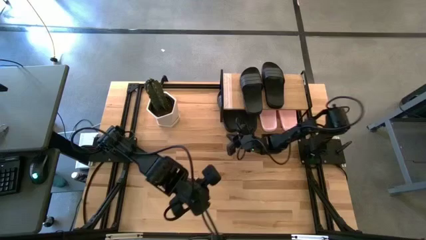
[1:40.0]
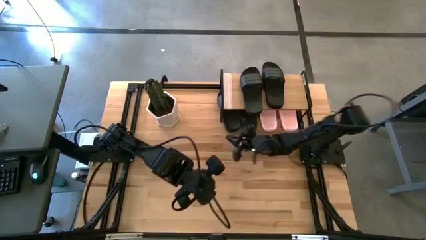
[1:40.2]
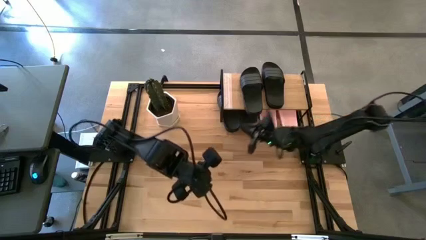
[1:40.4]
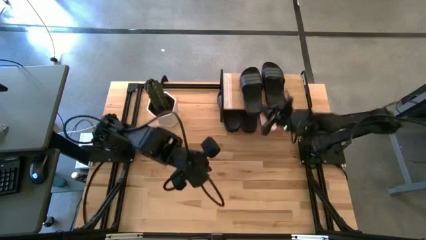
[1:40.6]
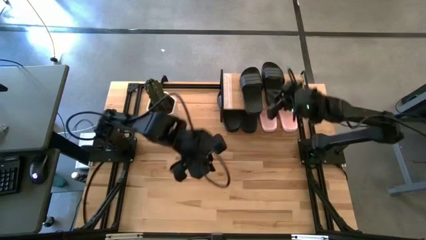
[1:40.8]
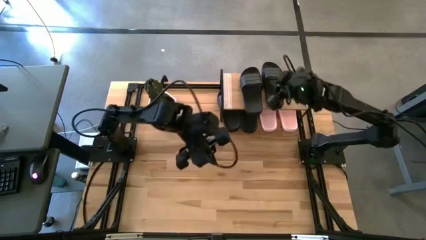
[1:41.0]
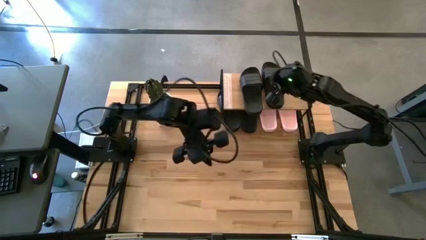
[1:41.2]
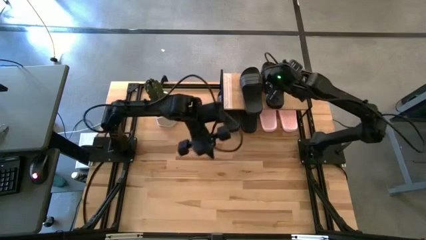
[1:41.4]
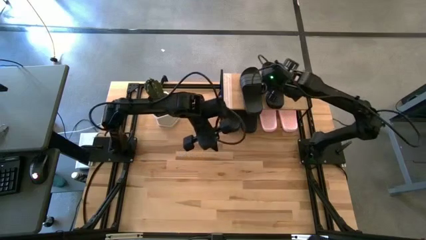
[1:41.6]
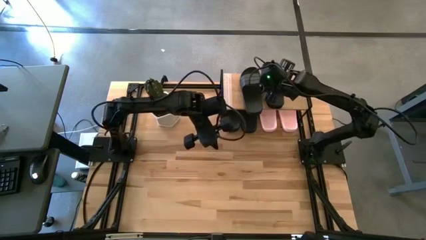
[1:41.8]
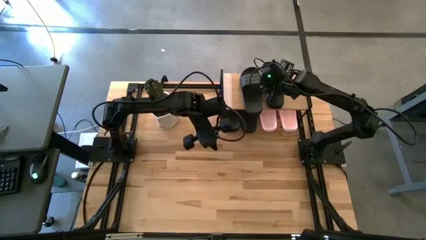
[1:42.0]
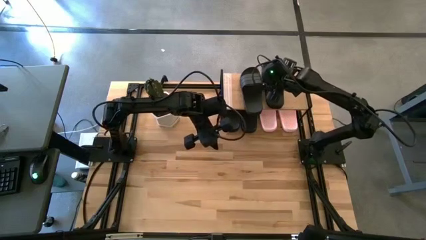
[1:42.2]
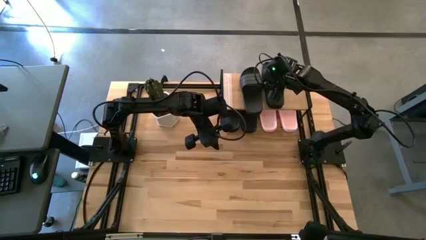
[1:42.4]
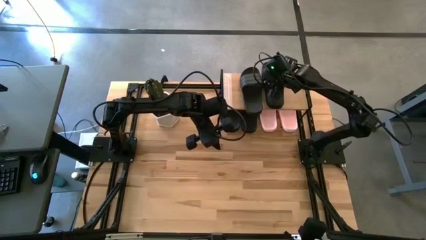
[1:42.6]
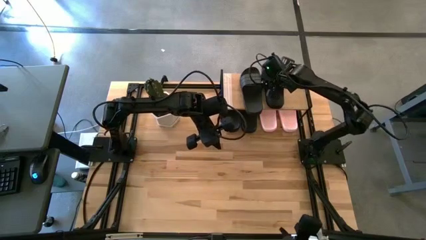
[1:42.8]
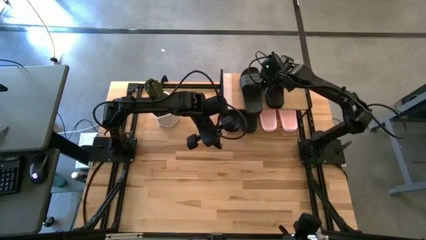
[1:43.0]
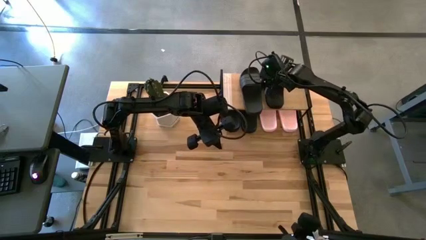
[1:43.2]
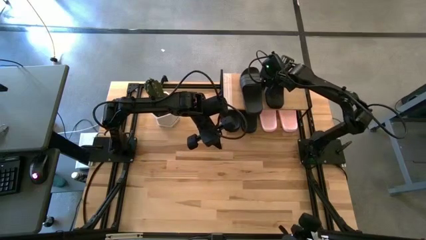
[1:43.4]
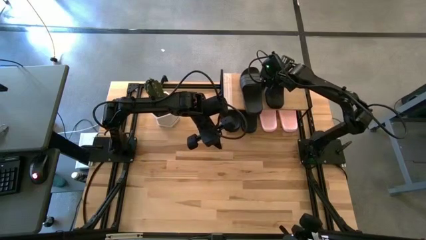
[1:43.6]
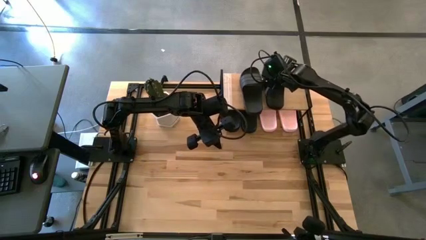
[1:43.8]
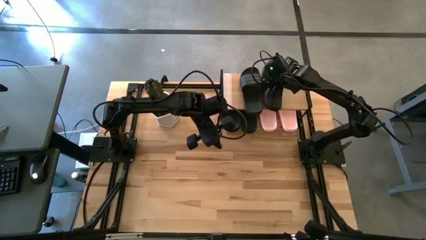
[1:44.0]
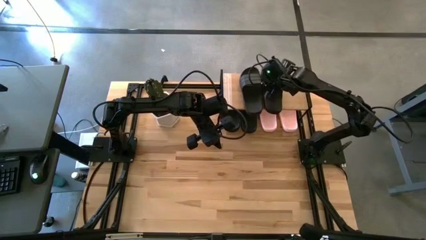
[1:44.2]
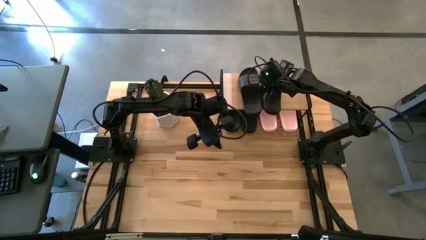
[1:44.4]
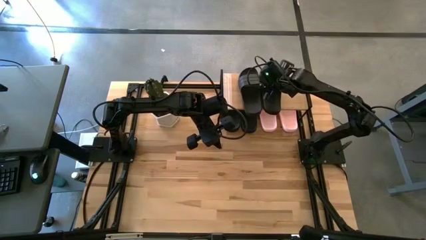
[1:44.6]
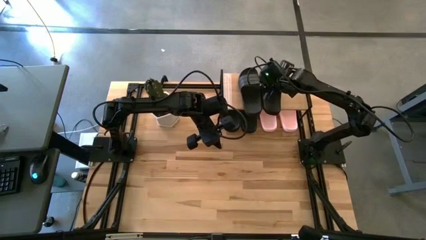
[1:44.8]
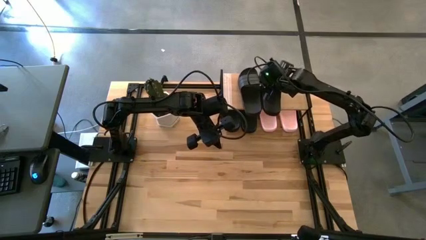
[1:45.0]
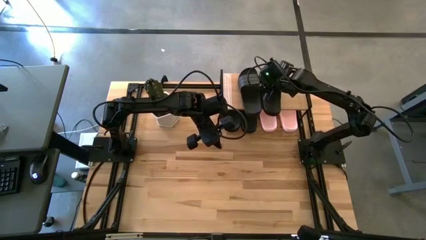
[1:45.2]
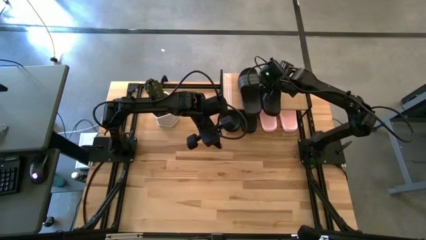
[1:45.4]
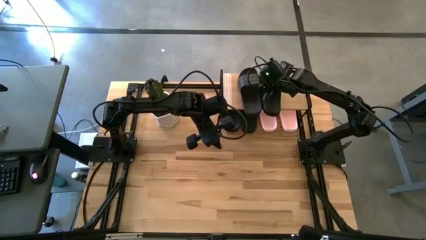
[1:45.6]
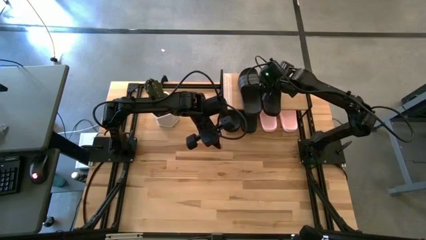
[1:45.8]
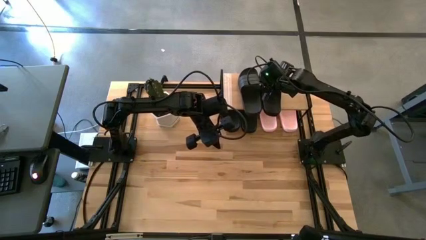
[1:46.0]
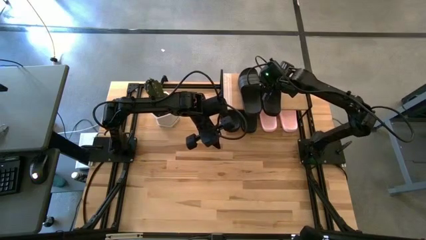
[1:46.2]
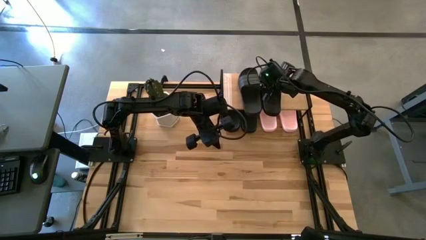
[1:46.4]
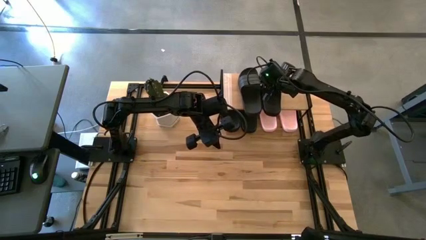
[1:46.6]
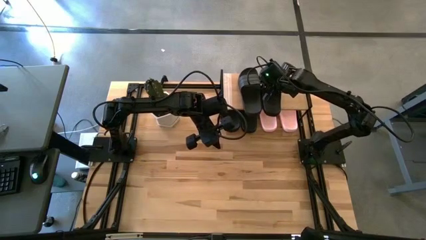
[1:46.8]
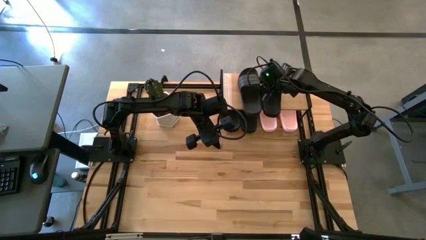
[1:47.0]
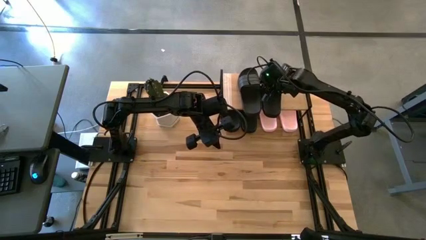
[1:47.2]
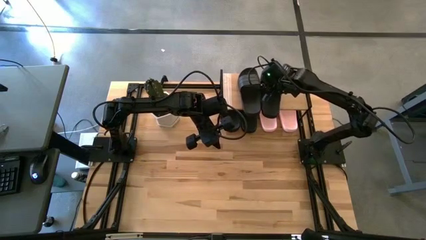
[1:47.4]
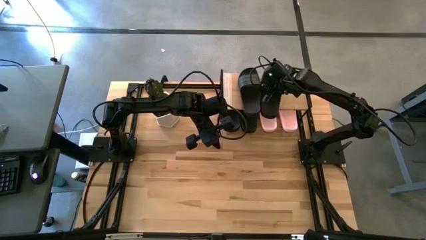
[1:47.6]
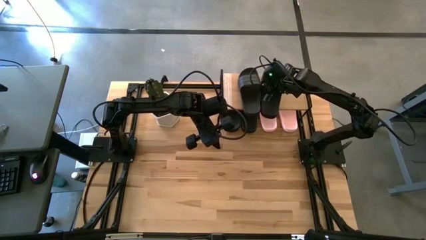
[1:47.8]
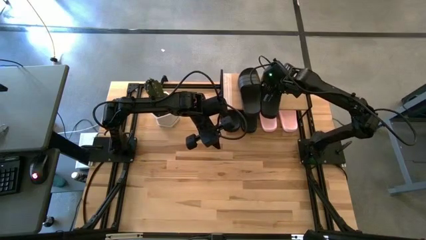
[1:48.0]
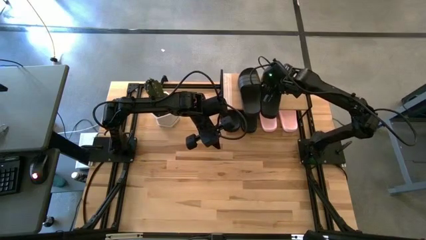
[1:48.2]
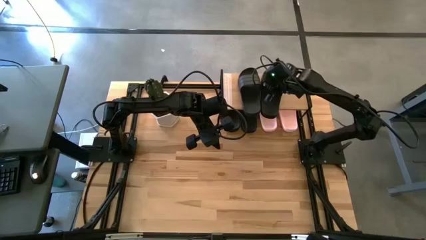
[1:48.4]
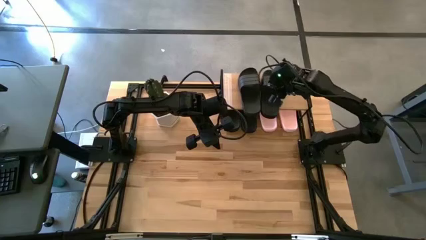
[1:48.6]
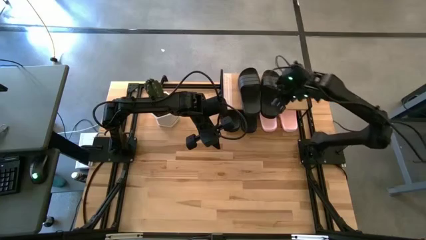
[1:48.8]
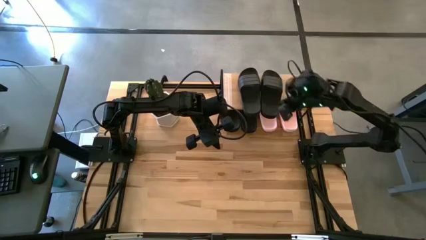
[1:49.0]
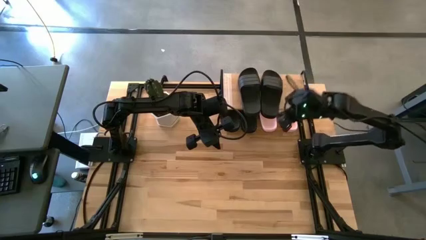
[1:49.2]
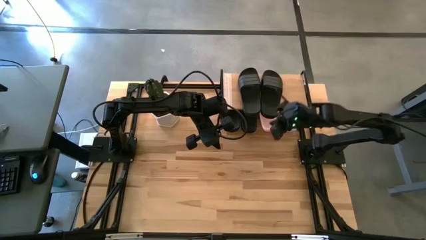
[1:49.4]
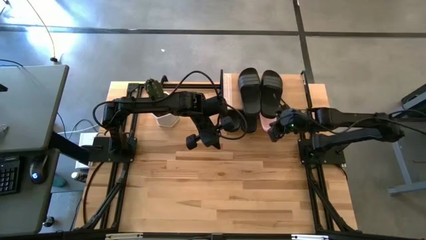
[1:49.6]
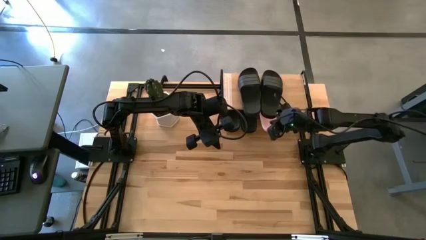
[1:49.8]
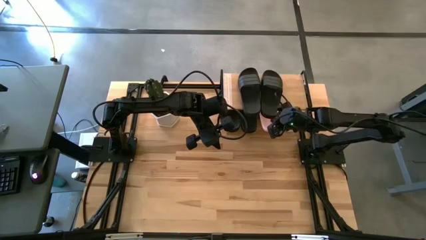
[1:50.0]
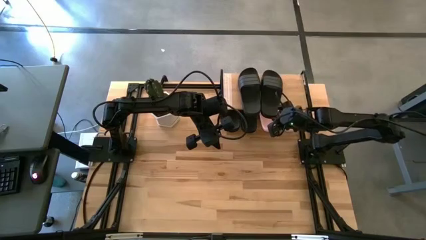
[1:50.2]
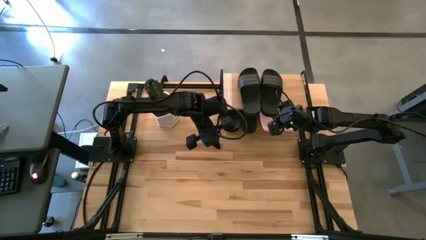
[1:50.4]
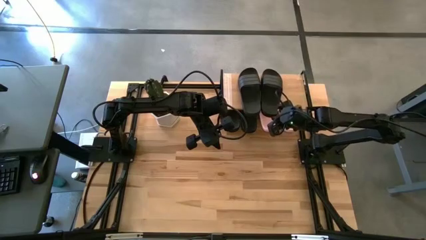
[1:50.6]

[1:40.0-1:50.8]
Task: Pick and place slides into the shelf
Adjust the black slipper on the shelf

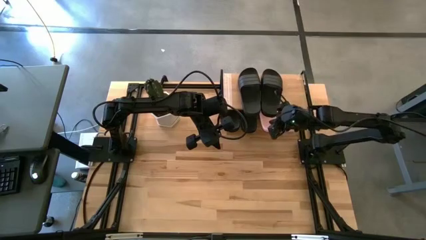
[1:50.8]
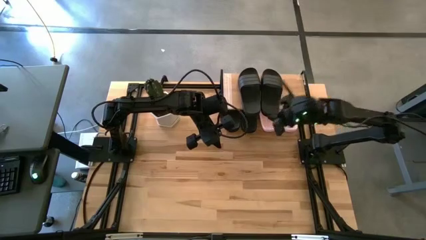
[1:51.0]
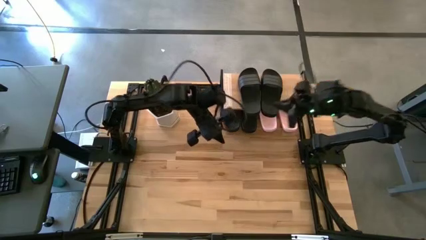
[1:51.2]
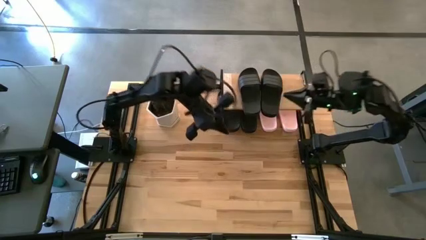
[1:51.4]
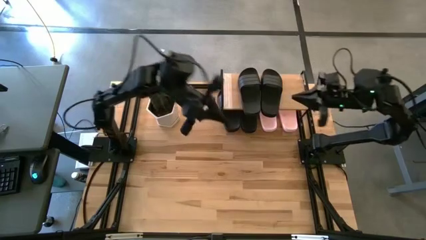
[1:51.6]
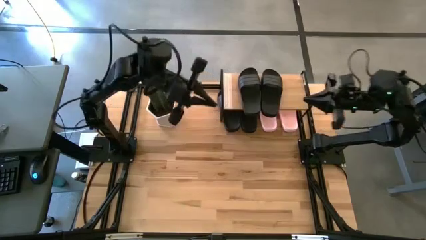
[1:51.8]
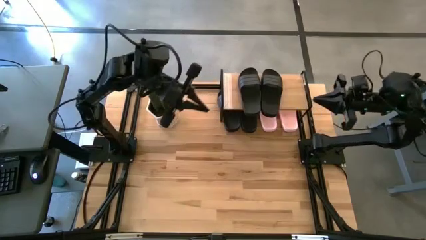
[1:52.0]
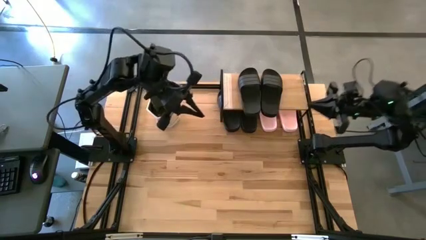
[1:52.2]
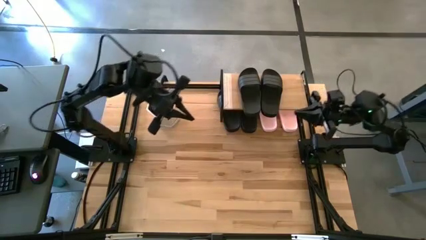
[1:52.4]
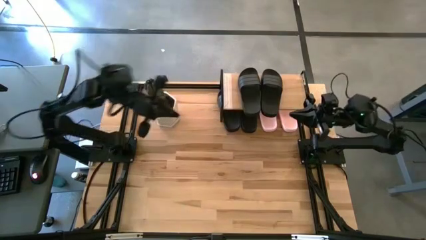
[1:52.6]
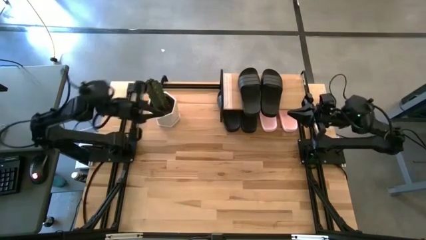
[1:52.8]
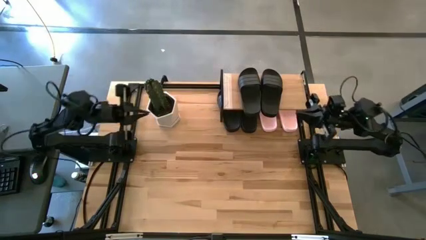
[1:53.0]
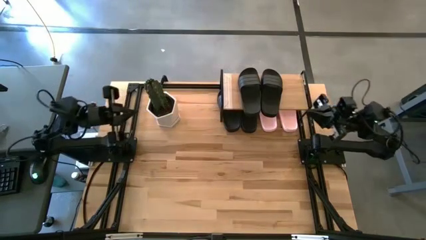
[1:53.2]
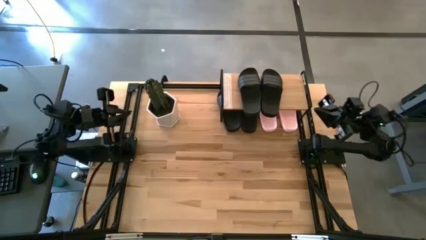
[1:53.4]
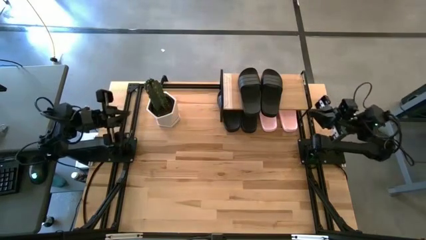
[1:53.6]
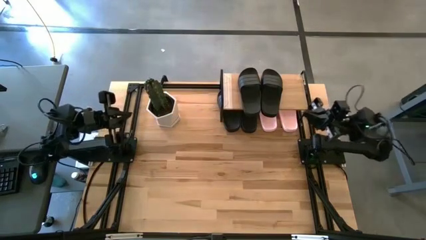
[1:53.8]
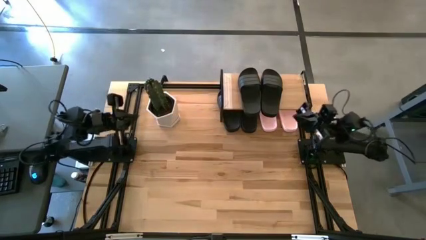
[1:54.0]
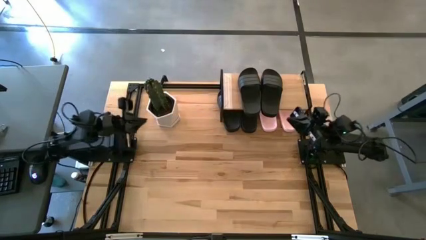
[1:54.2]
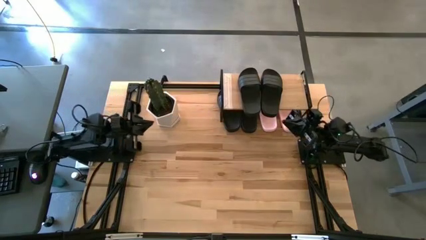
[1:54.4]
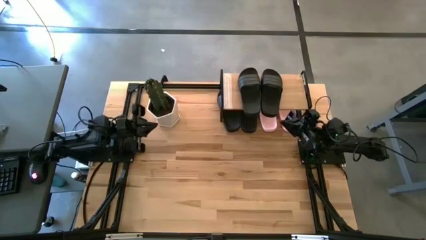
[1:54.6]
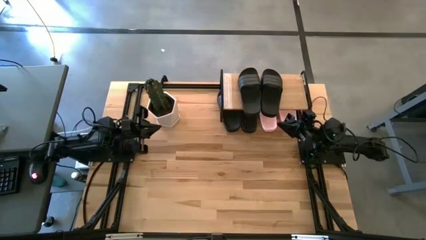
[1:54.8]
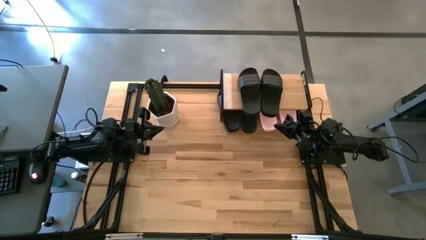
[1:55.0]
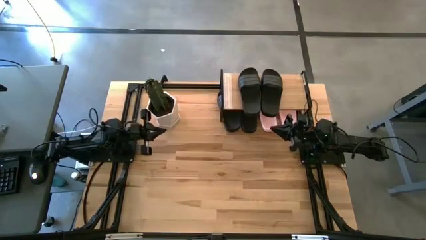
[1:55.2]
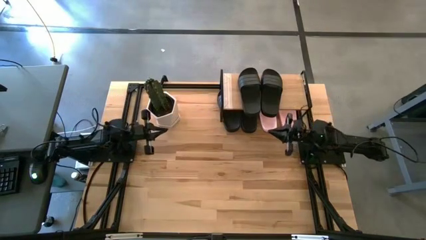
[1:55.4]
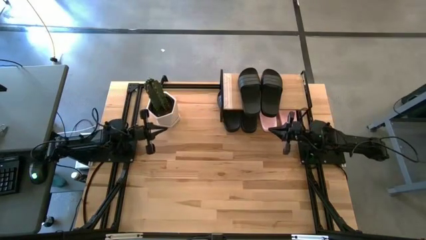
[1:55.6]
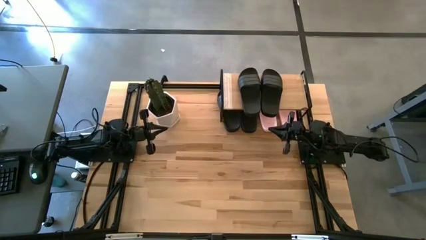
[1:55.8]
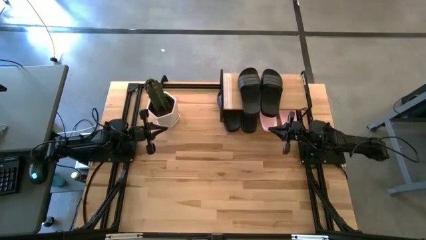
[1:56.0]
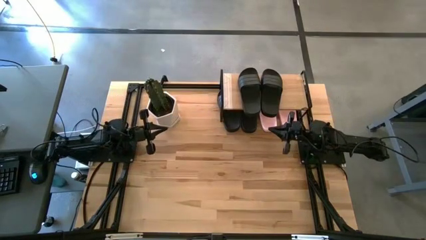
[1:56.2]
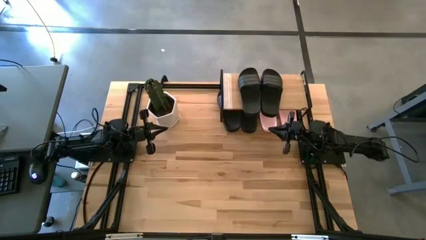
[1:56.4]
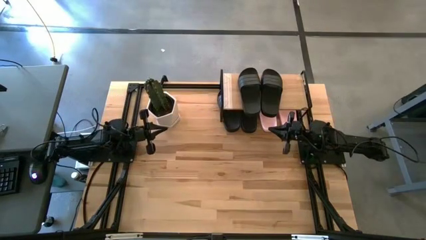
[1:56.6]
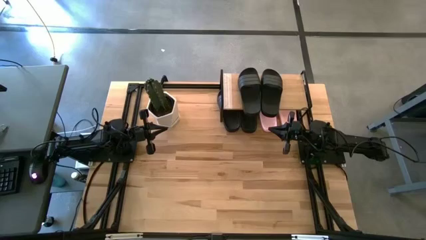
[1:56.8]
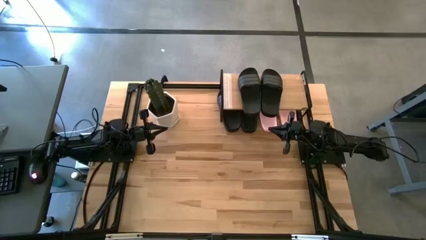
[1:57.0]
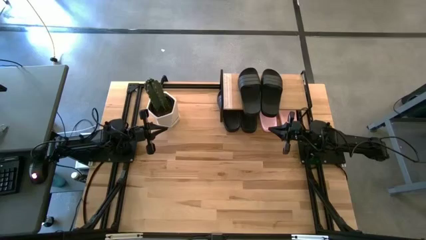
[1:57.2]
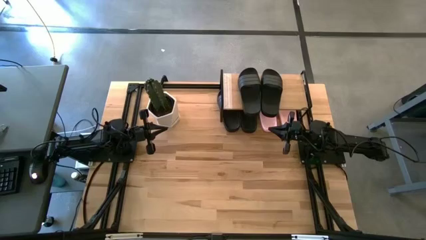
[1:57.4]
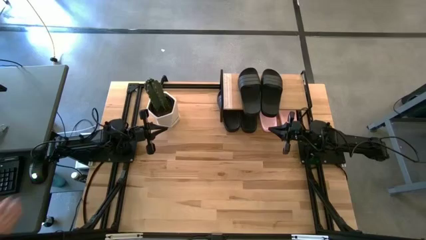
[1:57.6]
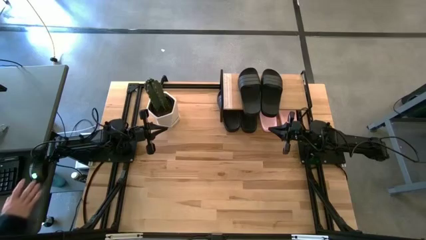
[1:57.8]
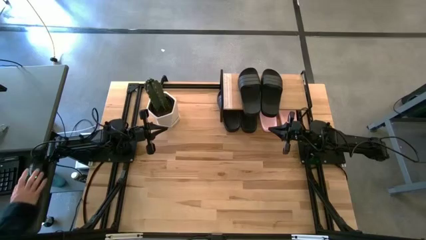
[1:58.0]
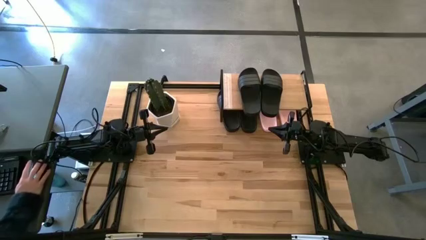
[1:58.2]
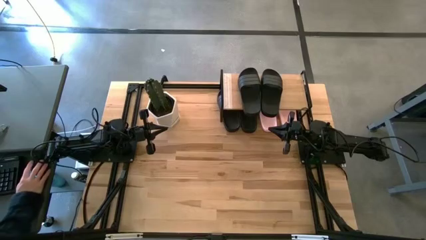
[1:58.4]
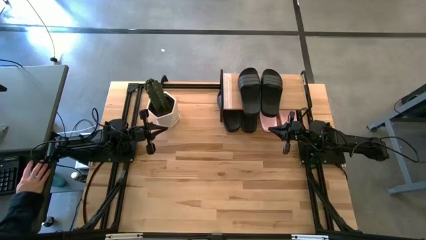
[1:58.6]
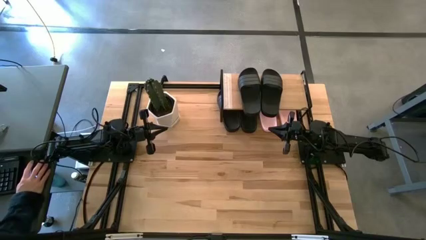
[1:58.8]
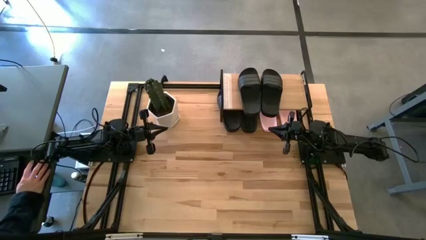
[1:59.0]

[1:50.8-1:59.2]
Return to Home Position
